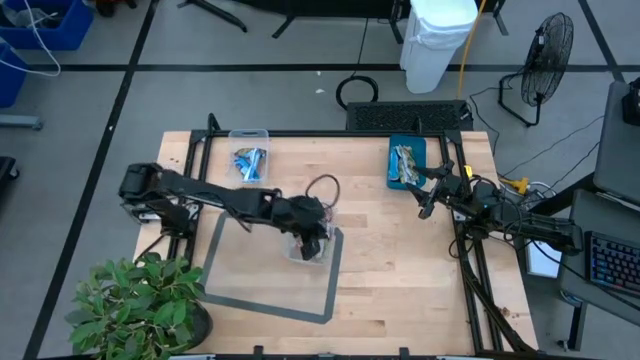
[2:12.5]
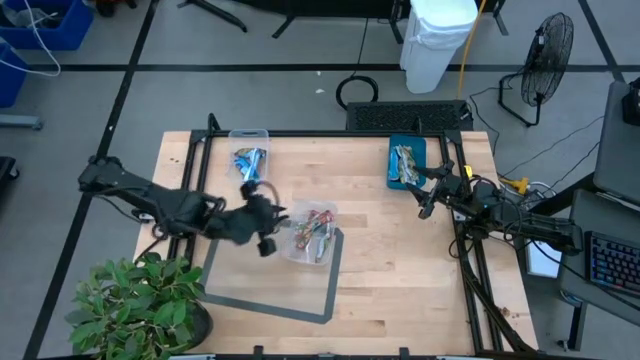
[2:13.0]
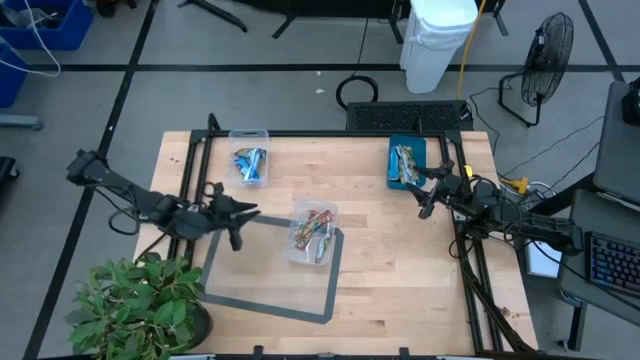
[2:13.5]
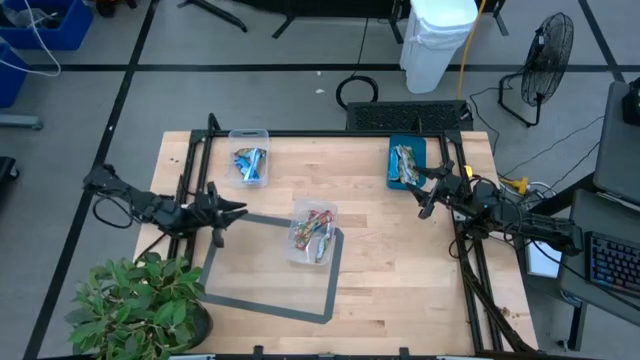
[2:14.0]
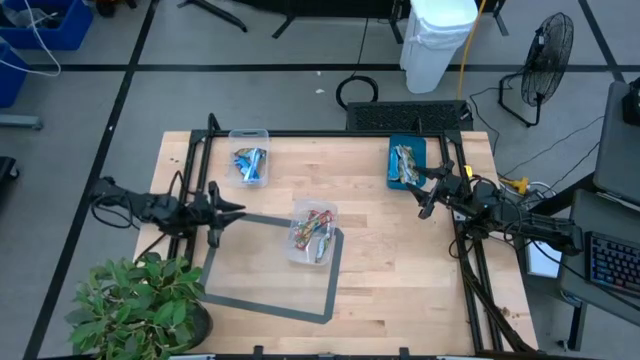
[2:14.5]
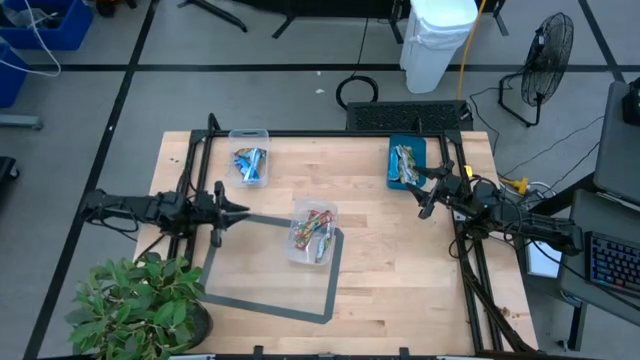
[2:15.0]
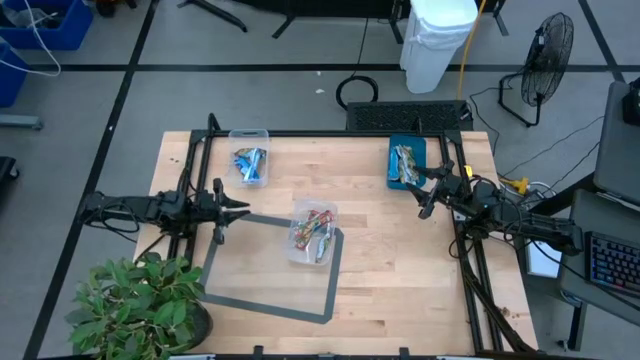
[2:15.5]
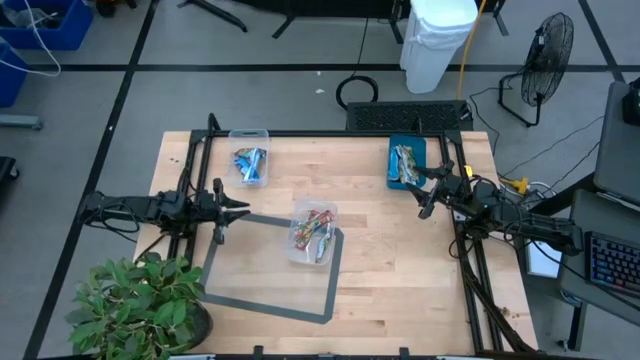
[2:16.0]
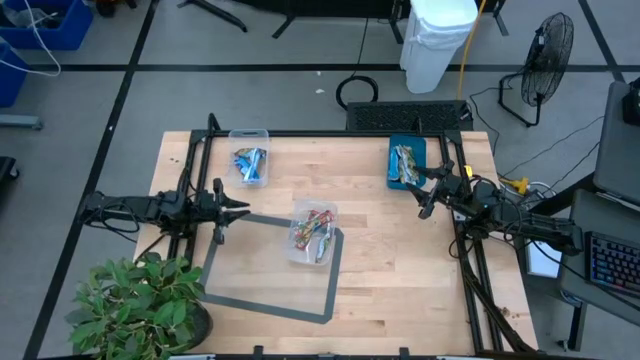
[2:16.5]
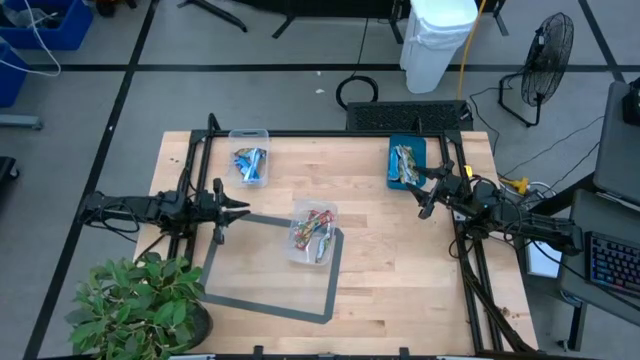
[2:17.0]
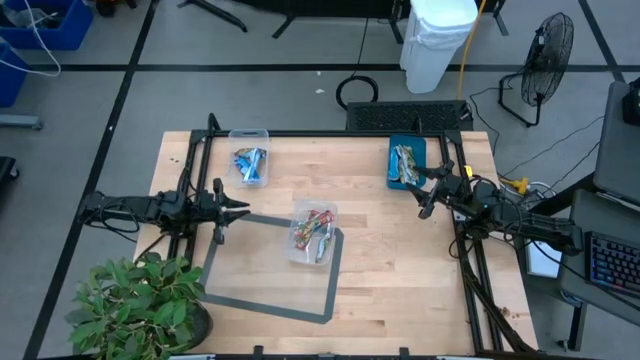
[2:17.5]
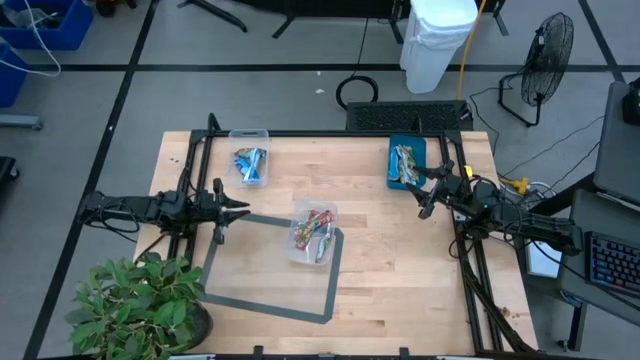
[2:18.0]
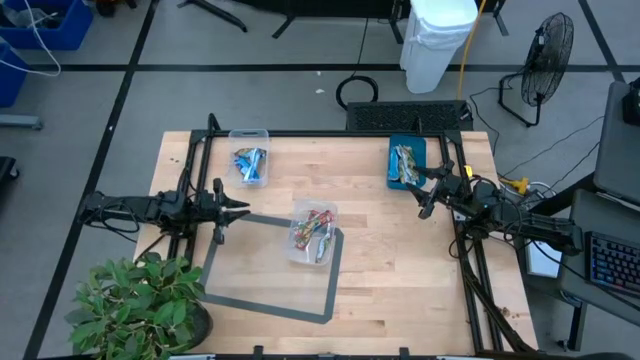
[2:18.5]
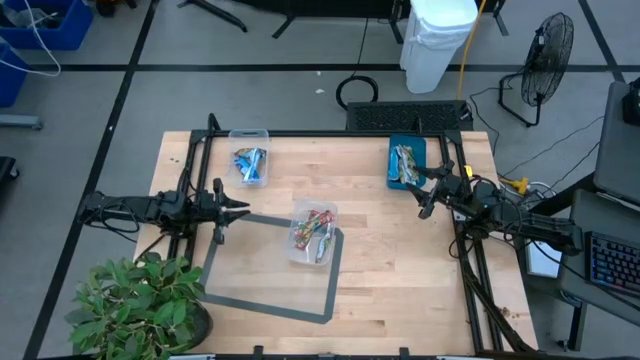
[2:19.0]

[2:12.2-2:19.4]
Task: Pick and place Granola Bars by type
Return to Home Position

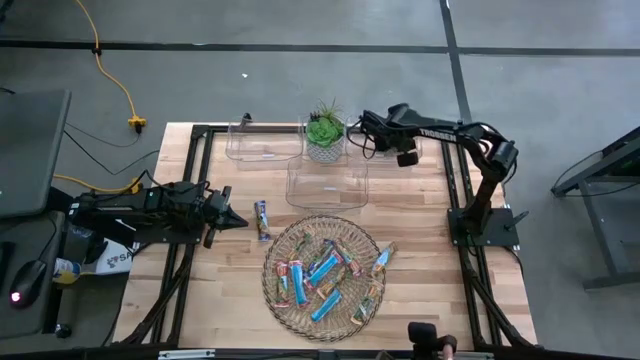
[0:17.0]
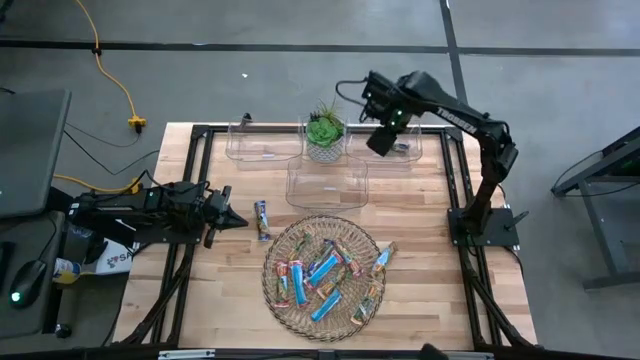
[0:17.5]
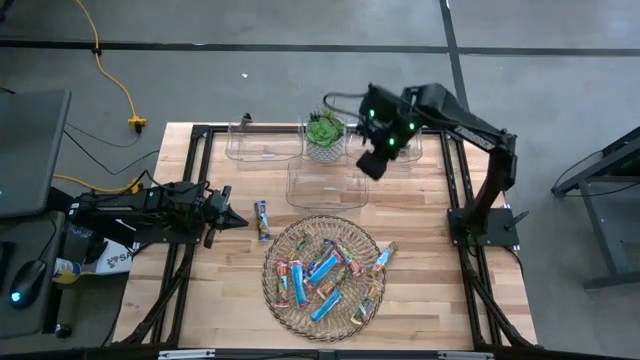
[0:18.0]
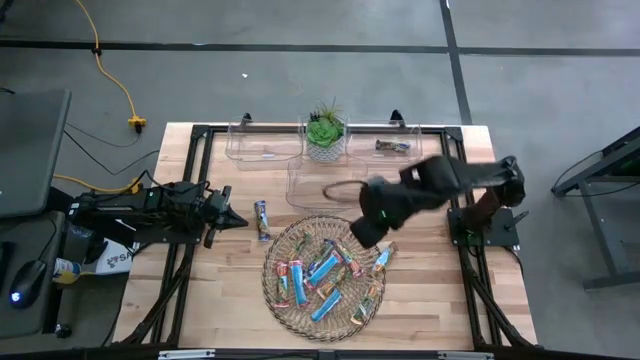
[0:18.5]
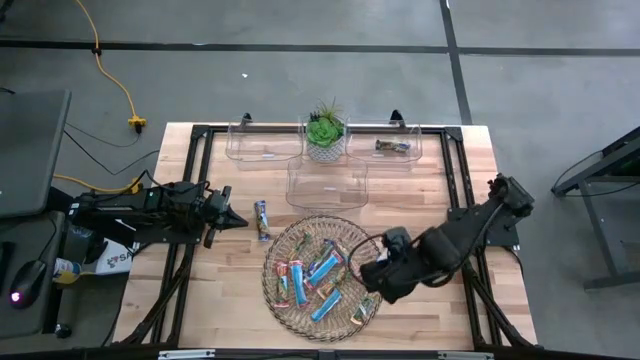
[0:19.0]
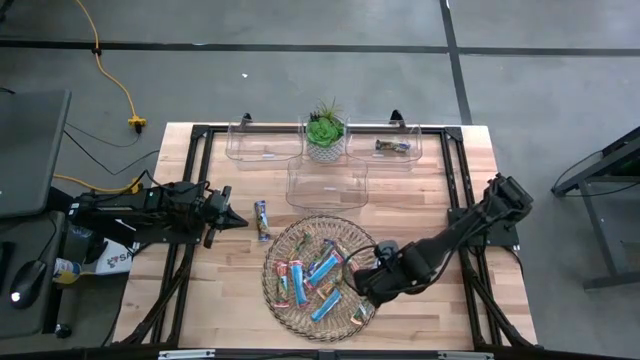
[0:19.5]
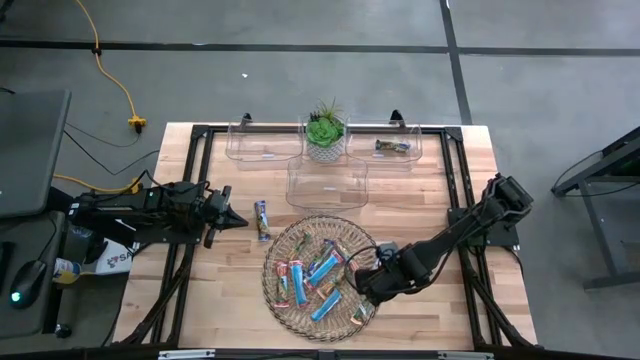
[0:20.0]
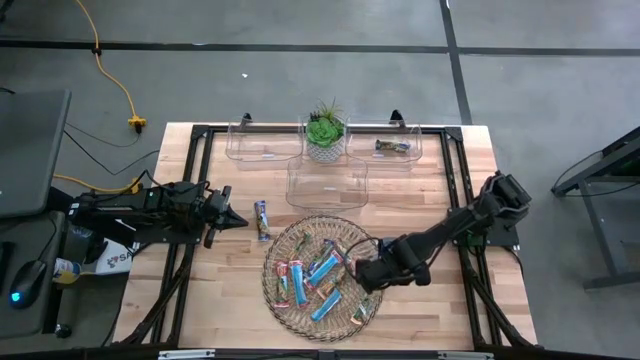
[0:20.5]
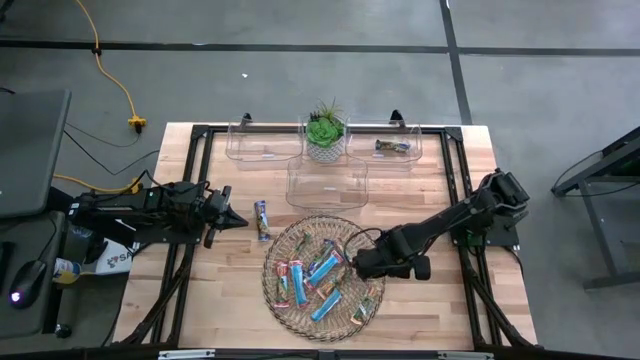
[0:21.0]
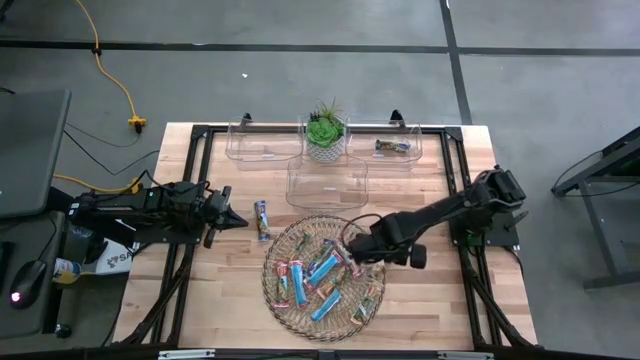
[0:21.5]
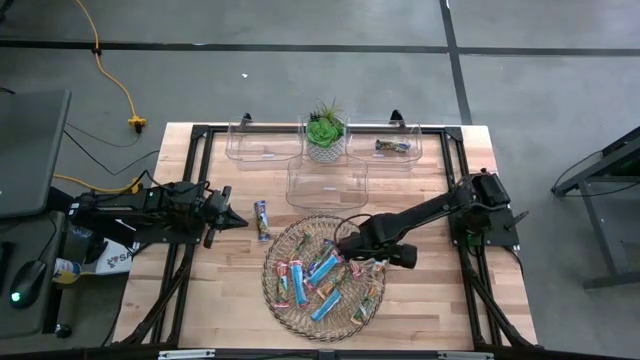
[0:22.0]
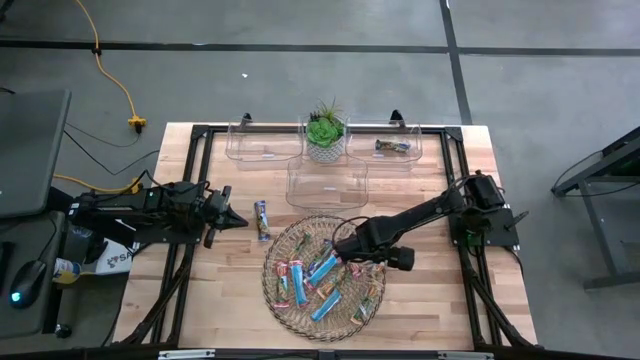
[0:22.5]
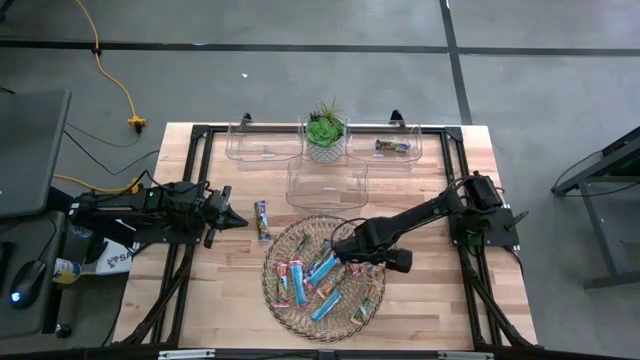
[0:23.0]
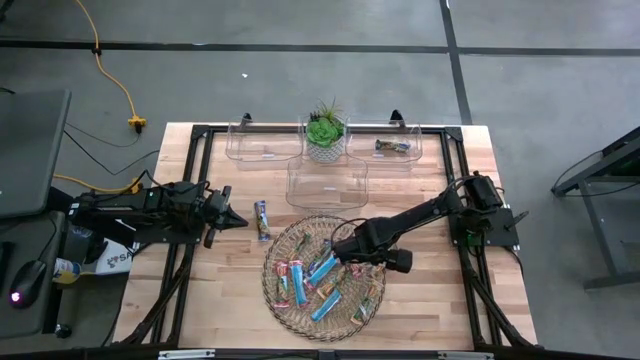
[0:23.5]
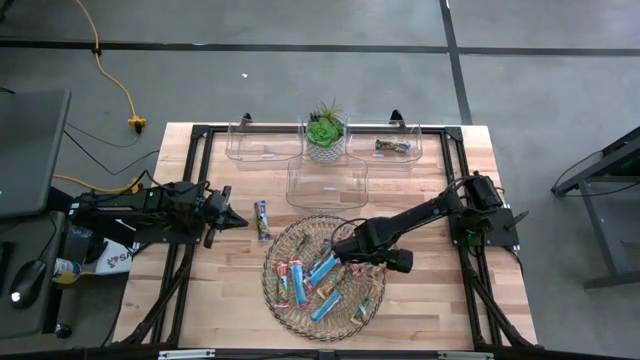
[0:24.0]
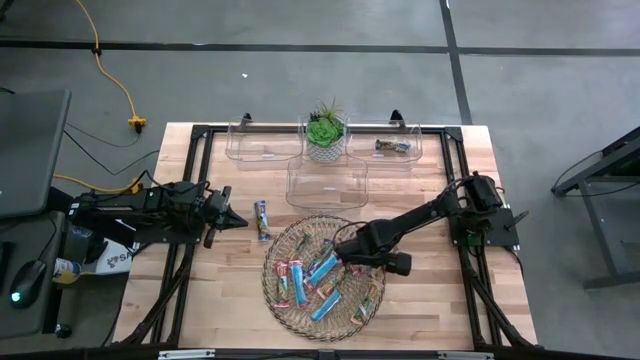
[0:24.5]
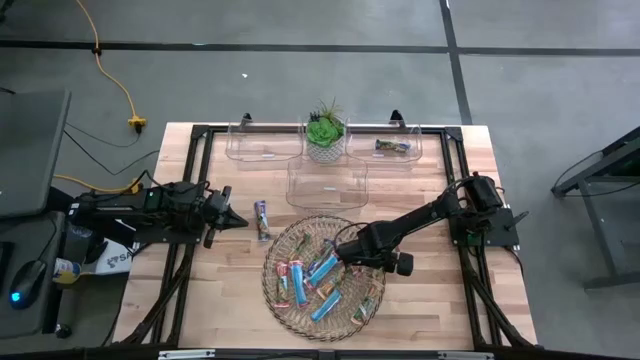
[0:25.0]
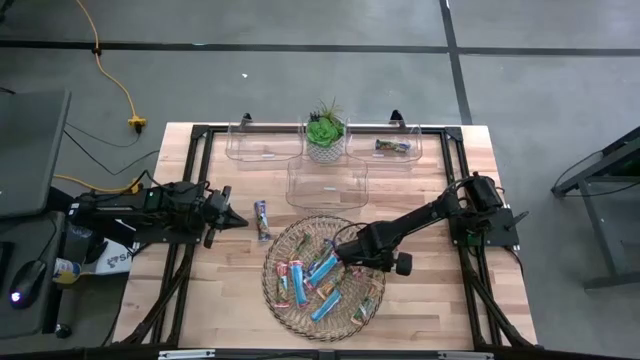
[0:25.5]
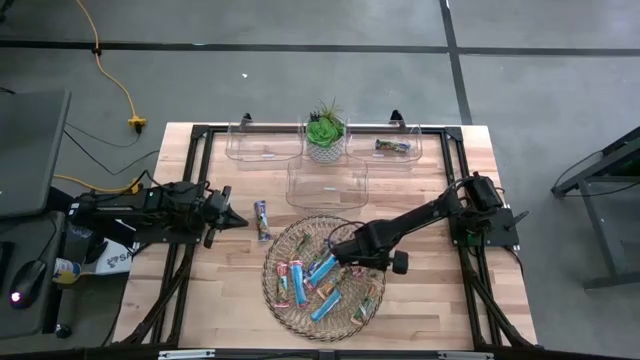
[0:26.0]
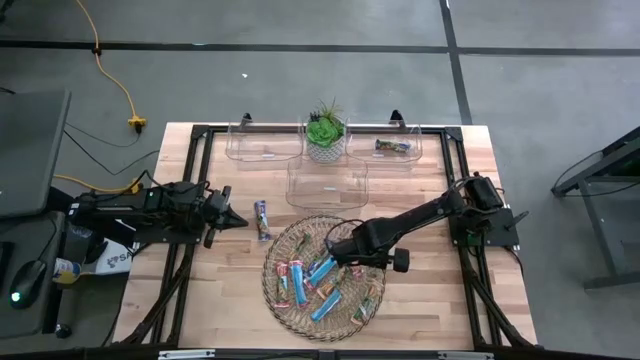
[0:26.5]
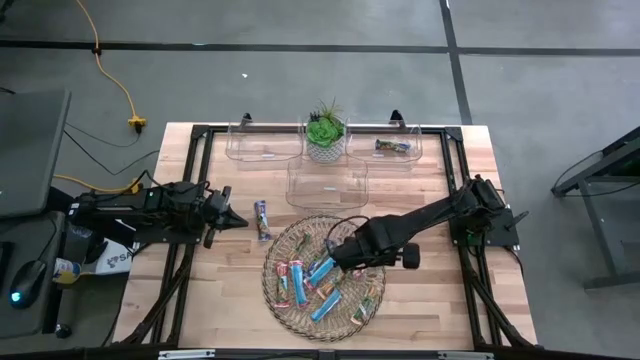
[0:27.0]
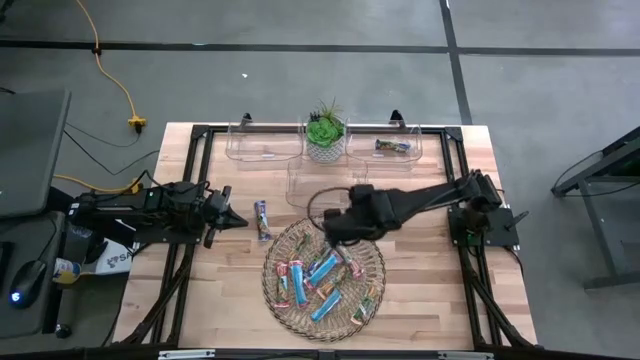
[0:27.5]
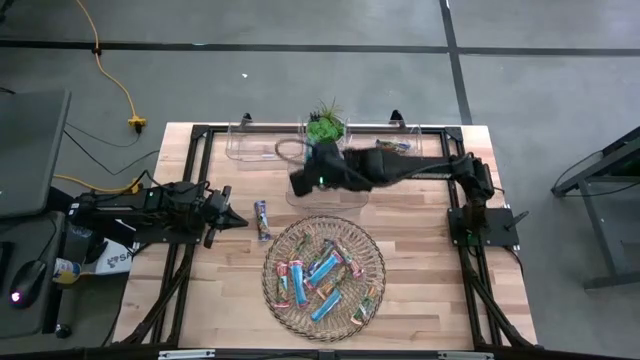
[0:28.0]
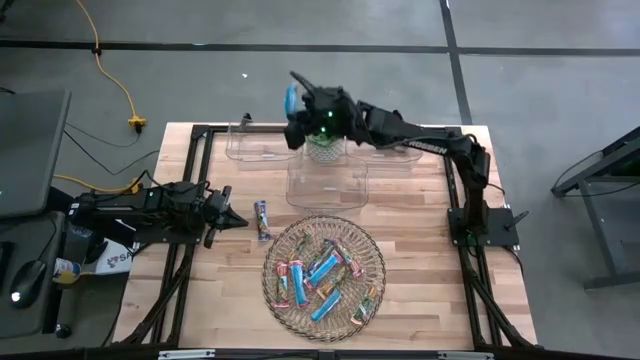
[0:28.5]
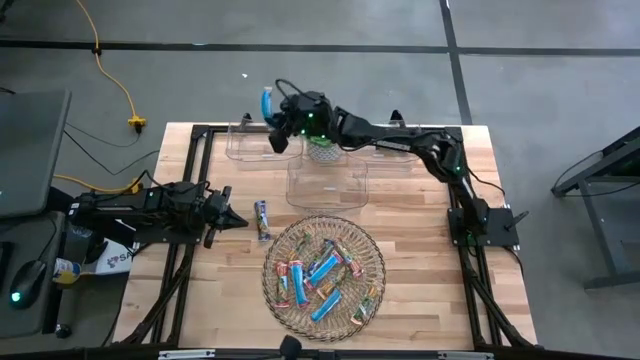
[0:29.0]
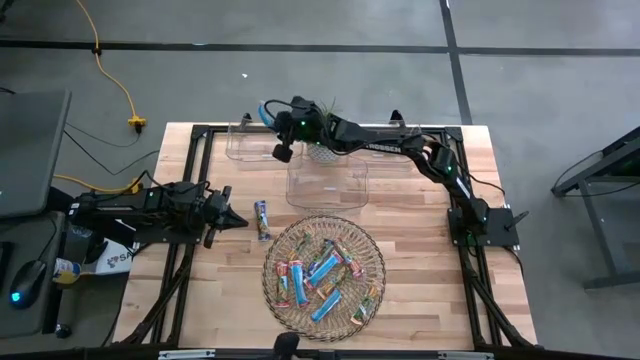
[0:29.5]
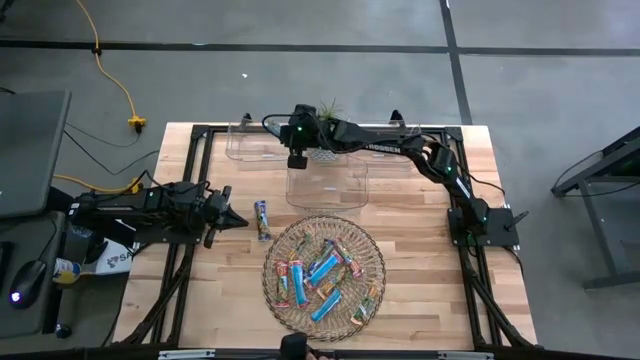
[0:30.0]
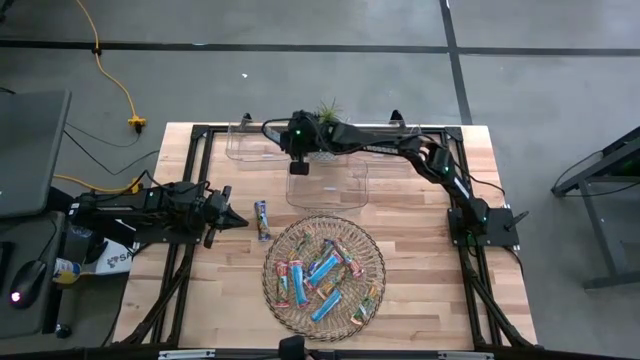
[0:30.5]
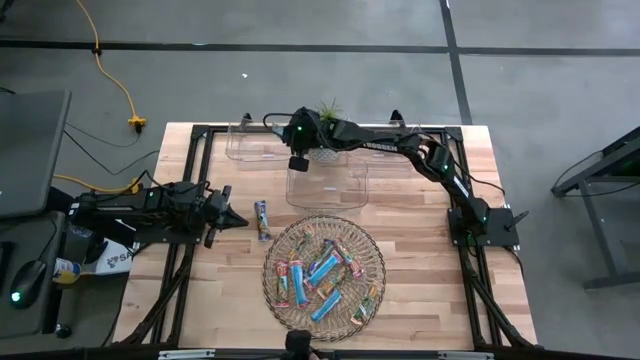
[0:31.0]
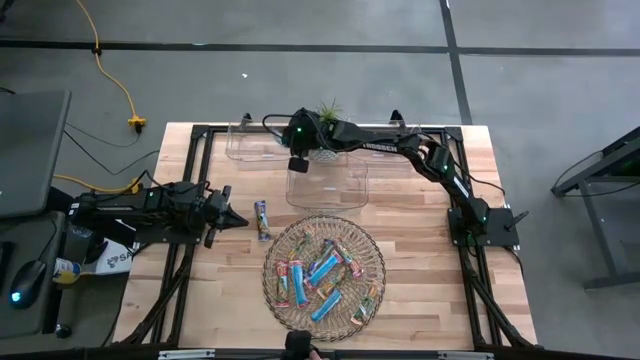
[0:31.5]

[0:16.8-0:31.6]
Task: Pick and place Granola Bars by type
Put the yellow granola bar into the top left transparent bin
